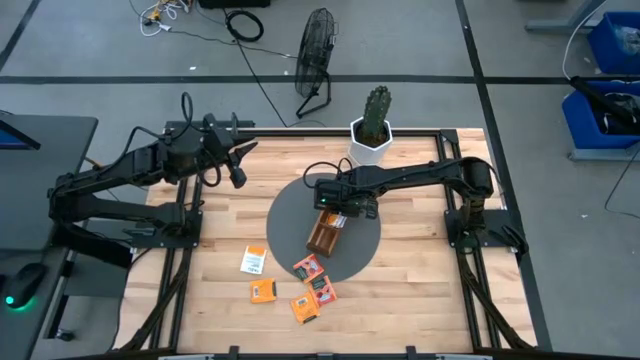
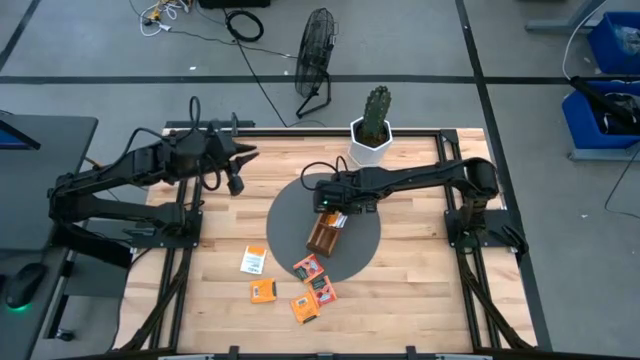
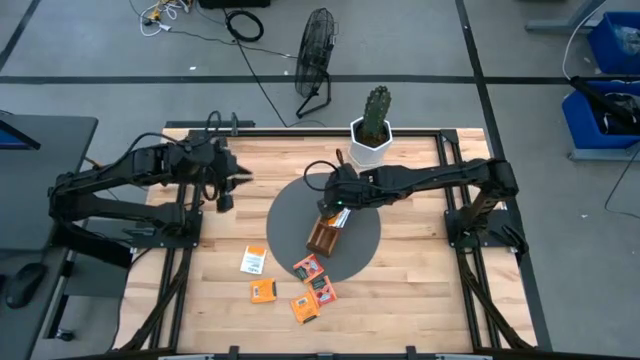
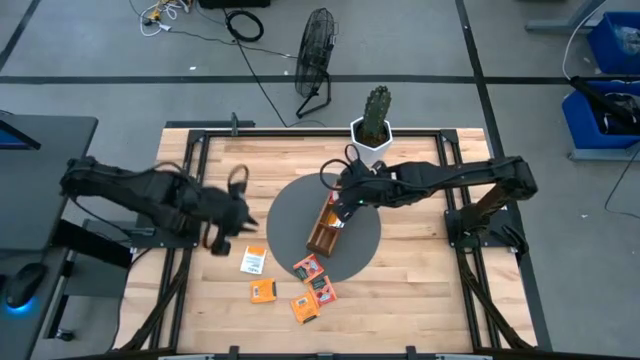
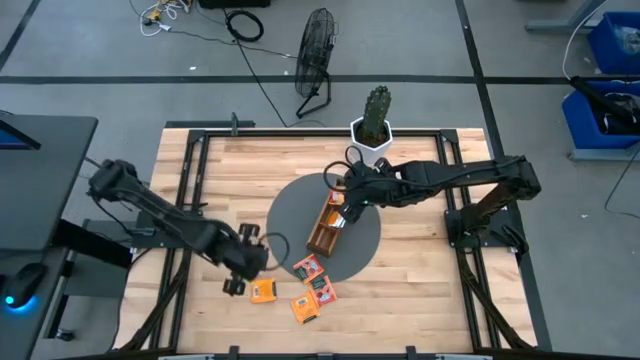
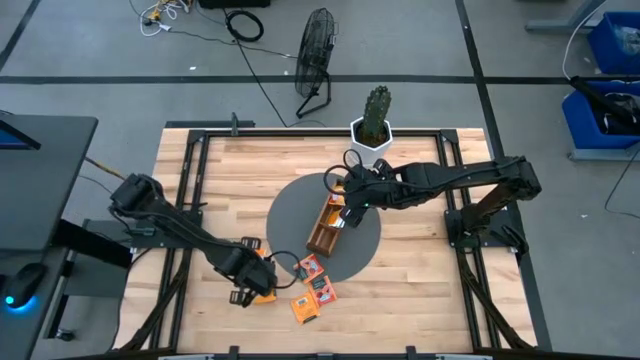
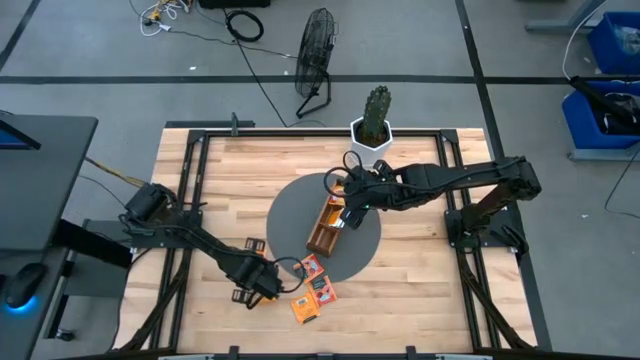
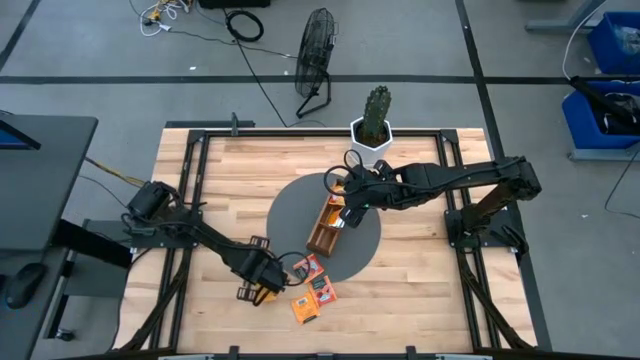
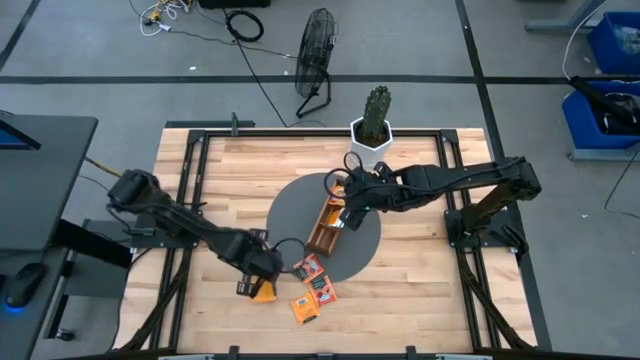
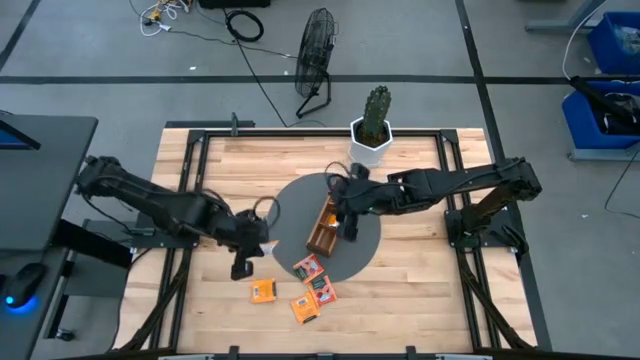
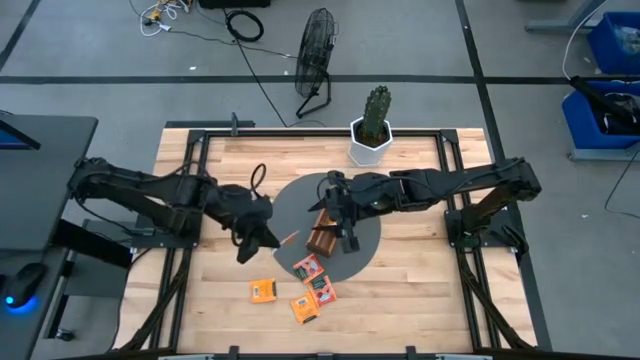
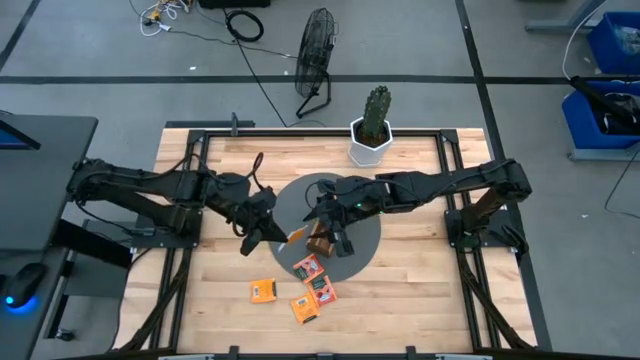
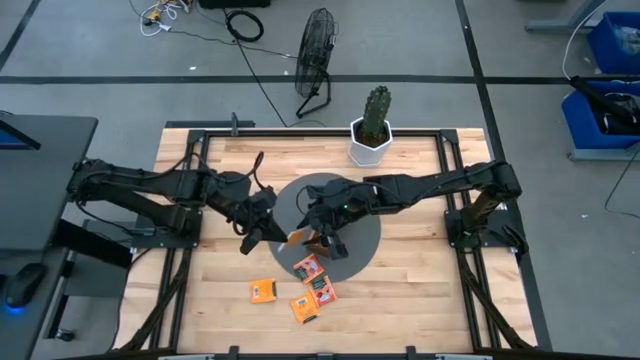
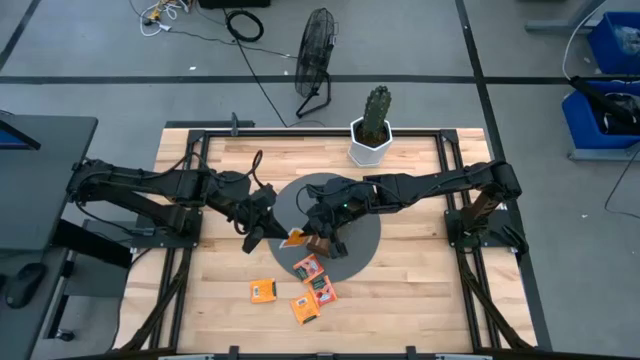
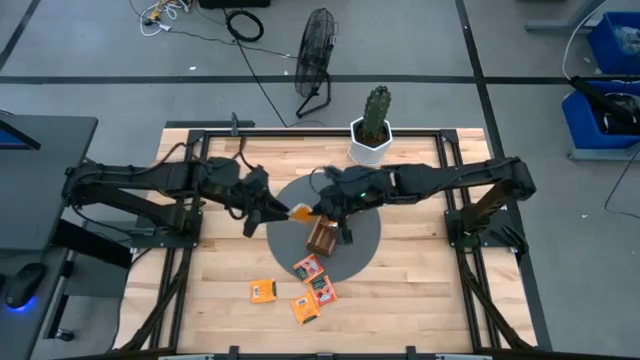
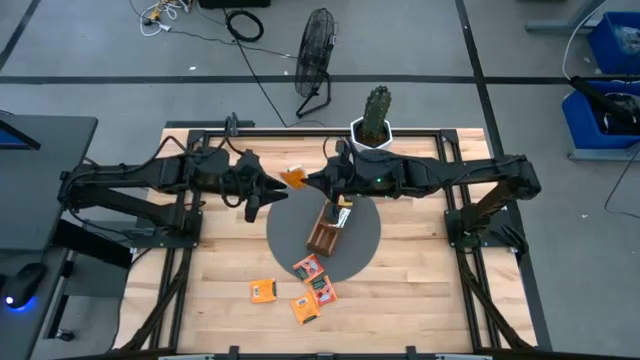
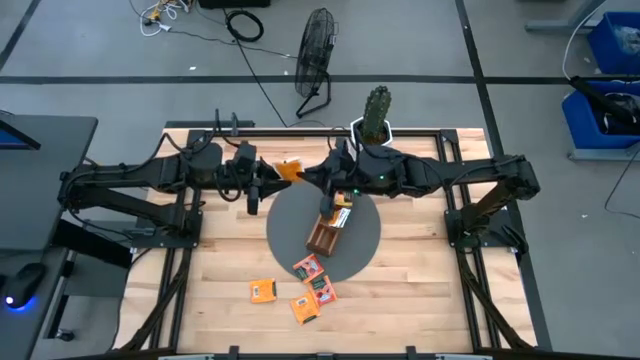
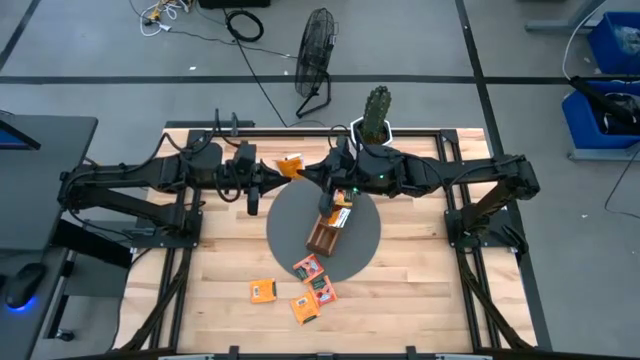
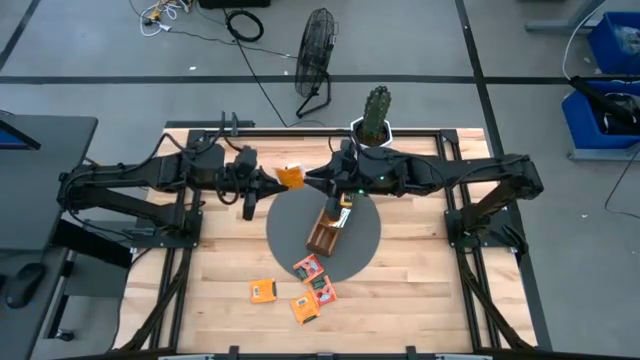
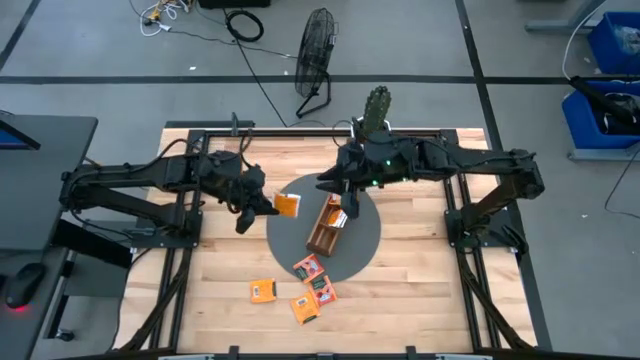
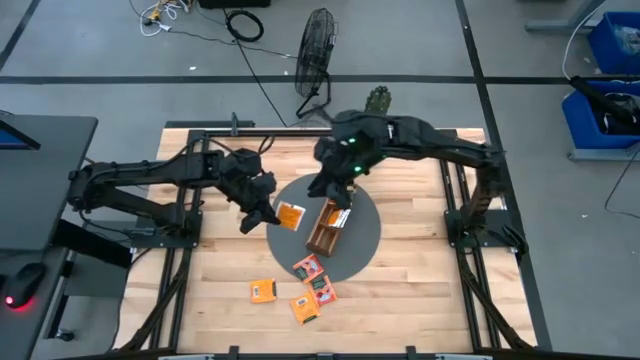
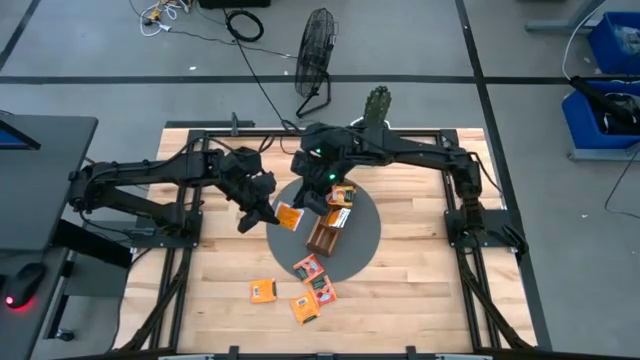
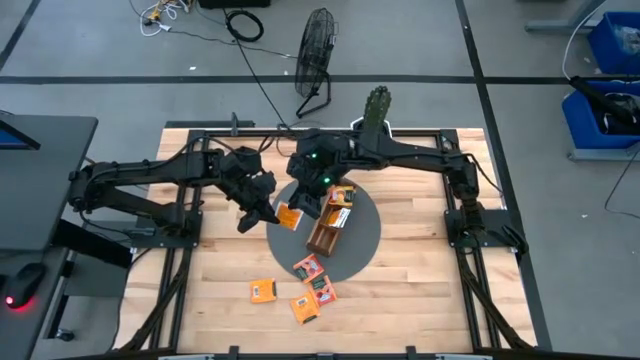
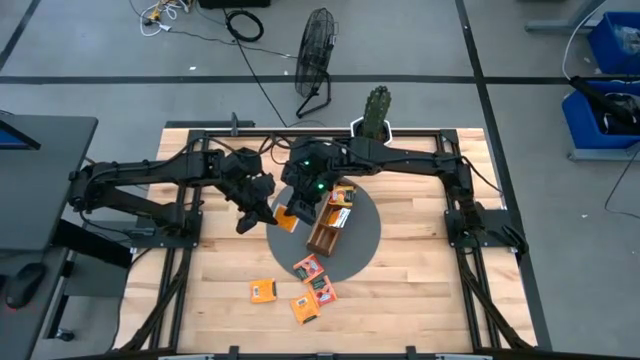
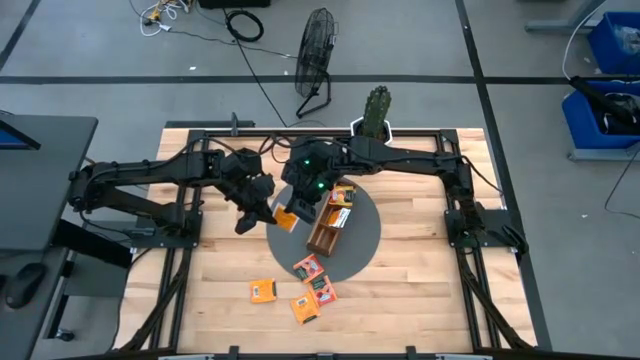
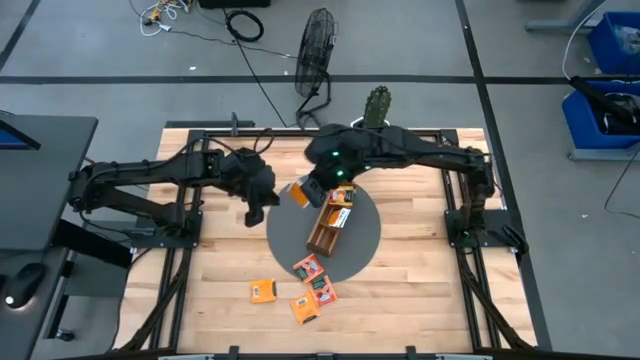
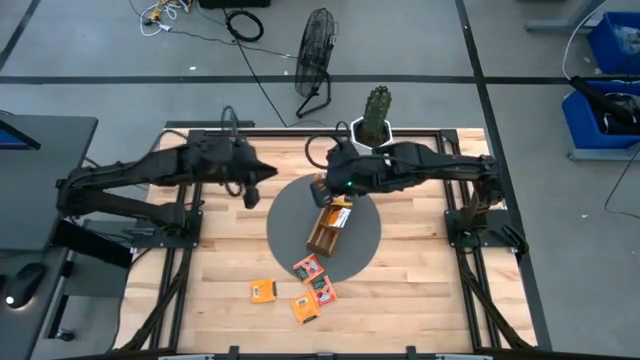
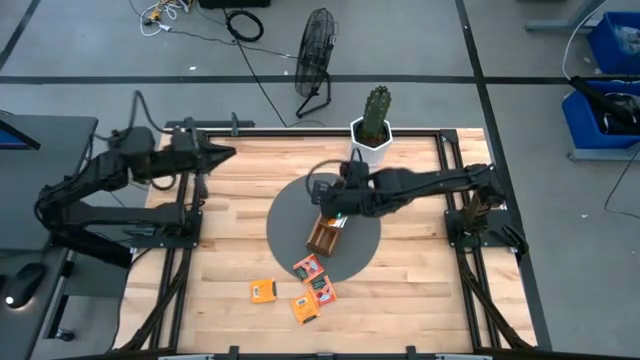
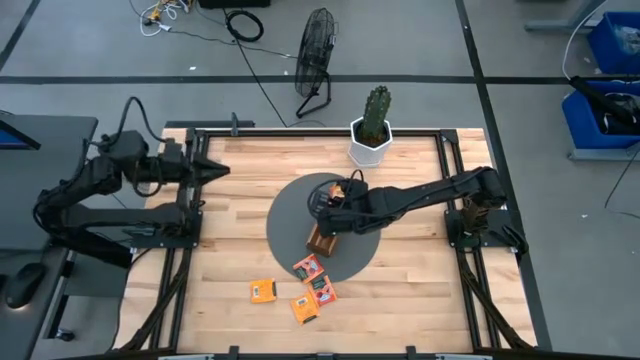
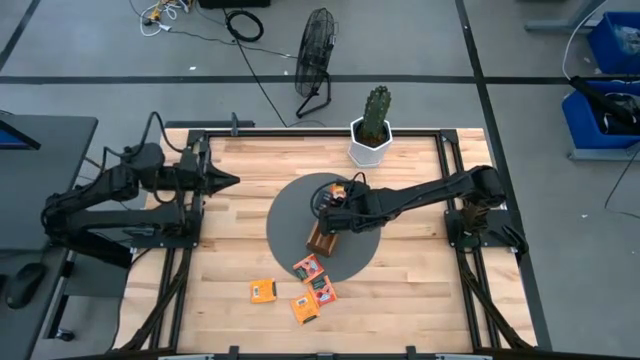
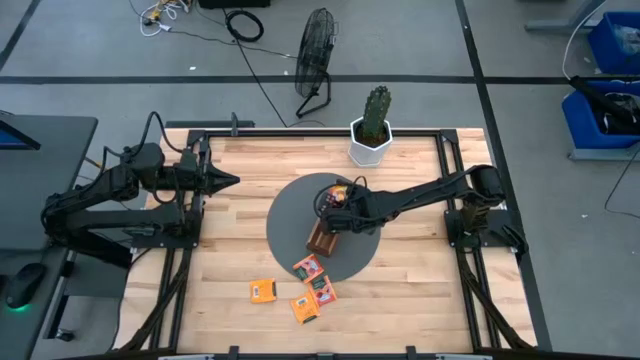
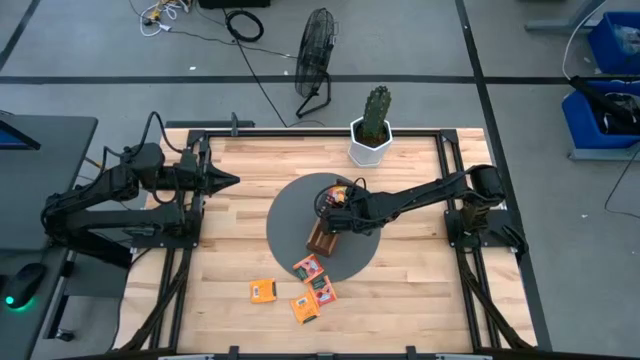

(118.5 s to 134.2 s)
Task: Pick & Place Tea
Put the white tea bag into the middle section of the wooden organizer

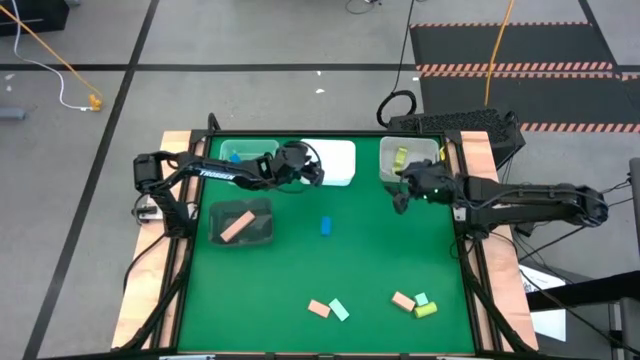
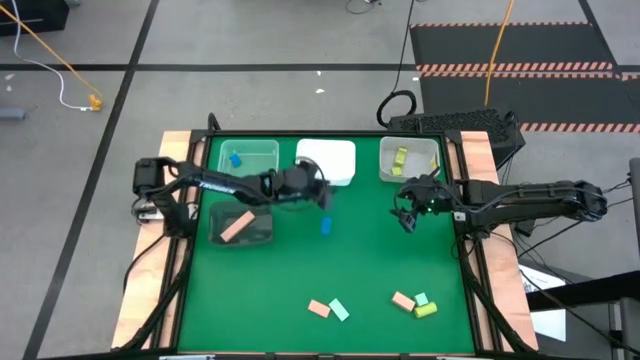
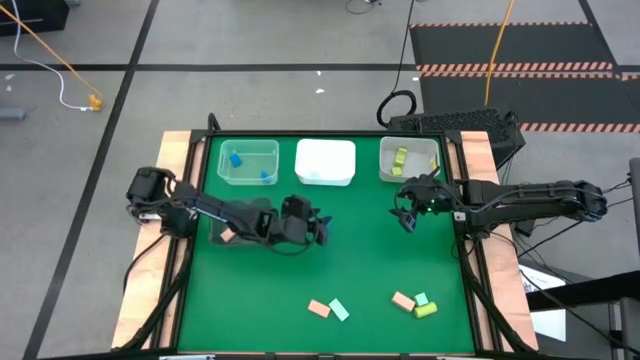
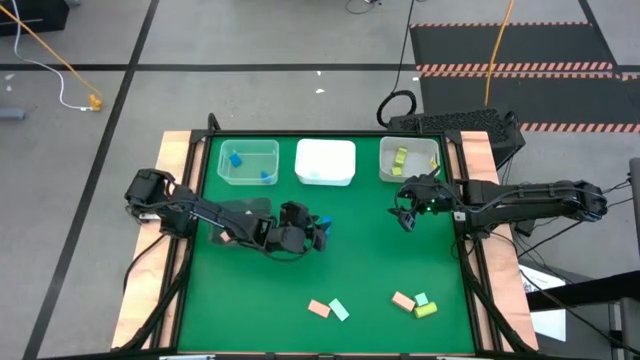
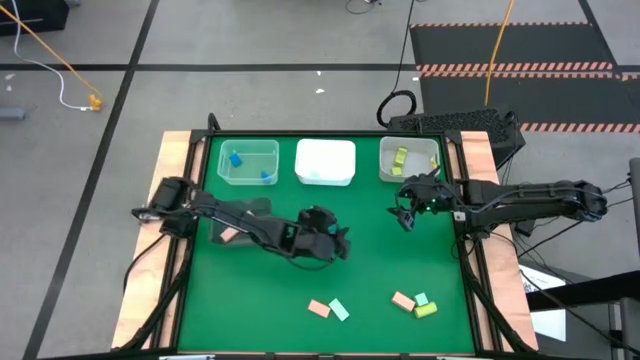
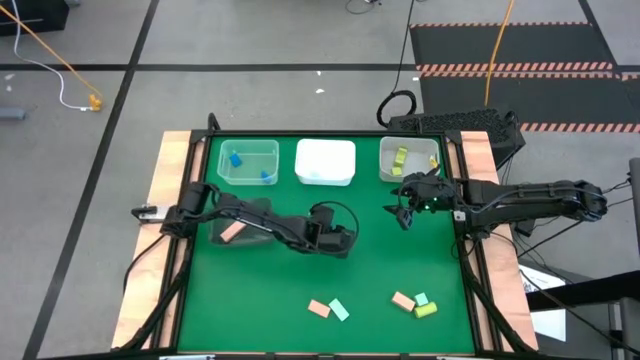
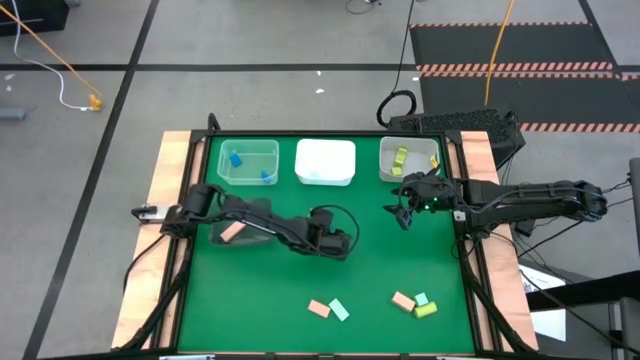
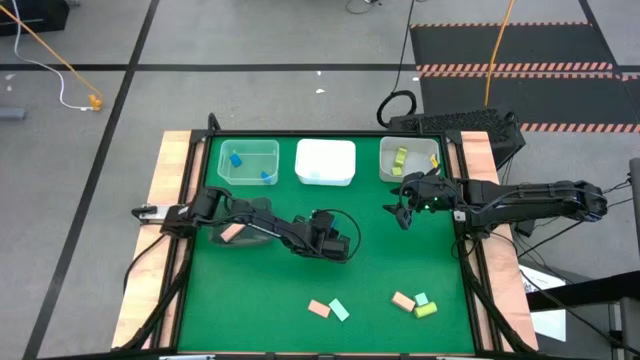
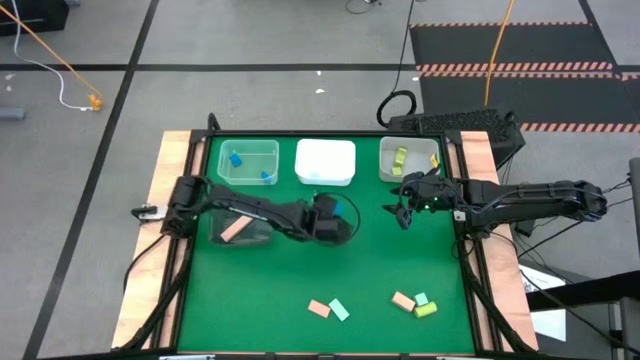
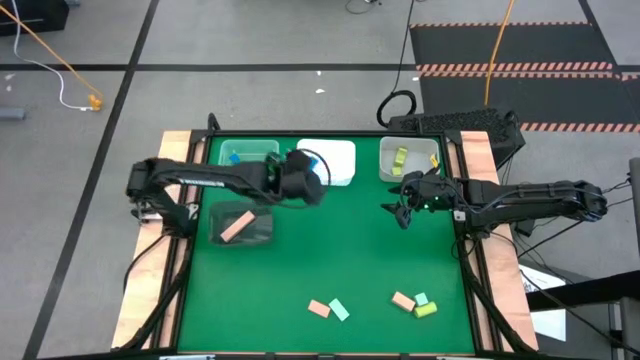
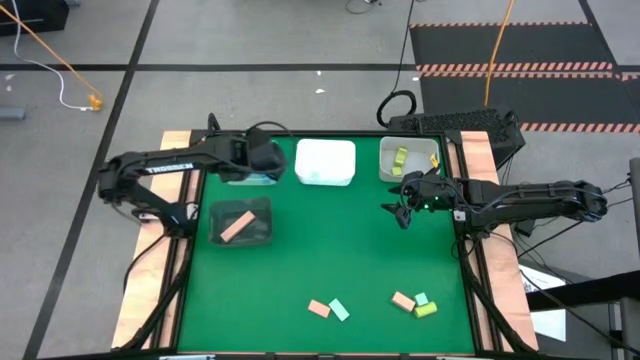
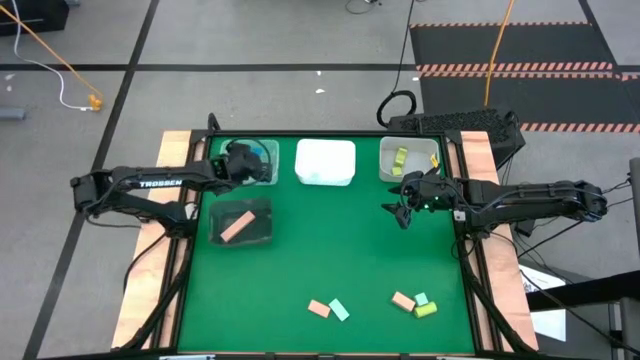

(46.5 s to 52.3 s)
Task: Sort & place blocks by color
Put the blue block into the transparent bin
